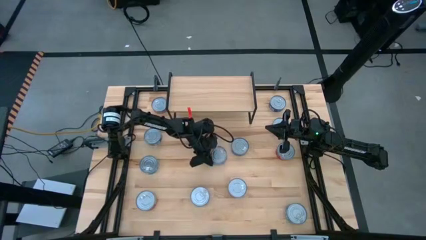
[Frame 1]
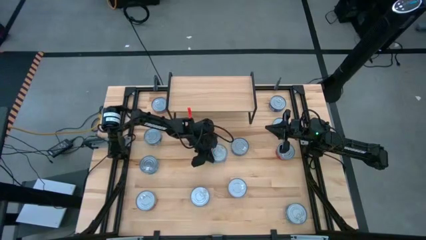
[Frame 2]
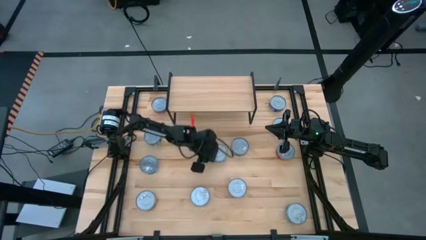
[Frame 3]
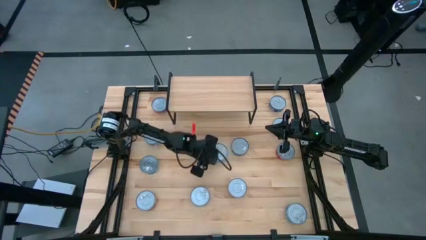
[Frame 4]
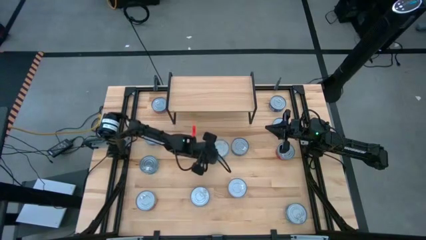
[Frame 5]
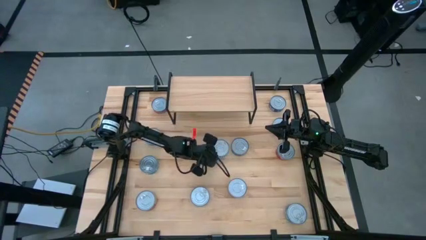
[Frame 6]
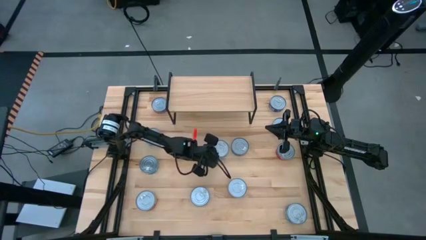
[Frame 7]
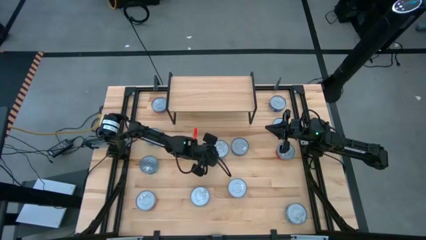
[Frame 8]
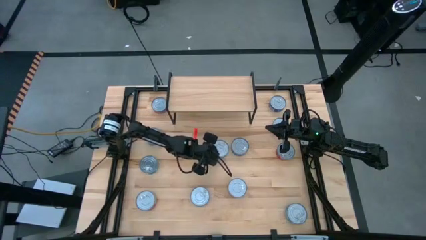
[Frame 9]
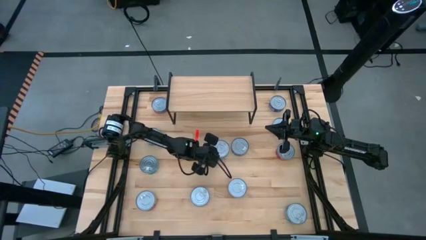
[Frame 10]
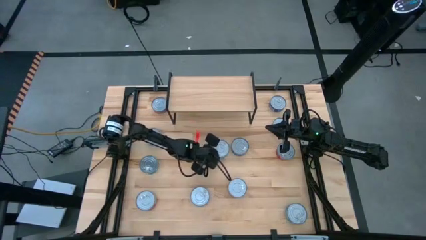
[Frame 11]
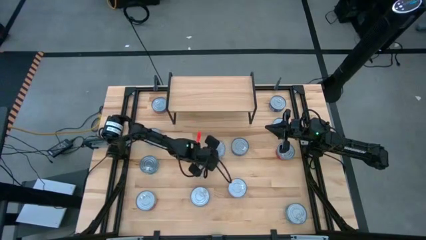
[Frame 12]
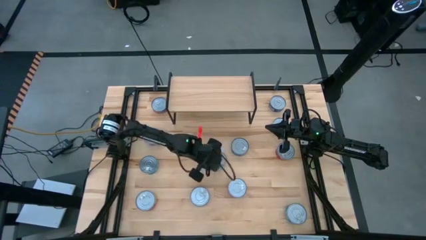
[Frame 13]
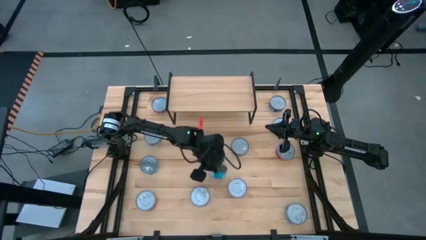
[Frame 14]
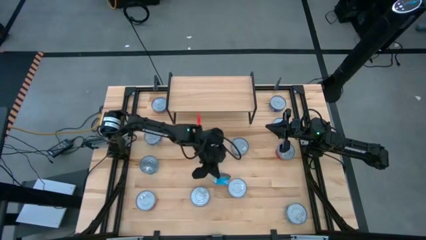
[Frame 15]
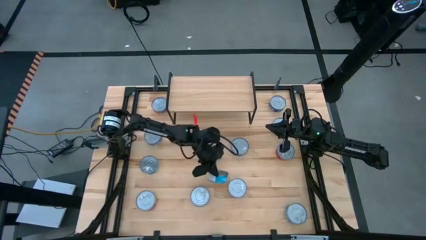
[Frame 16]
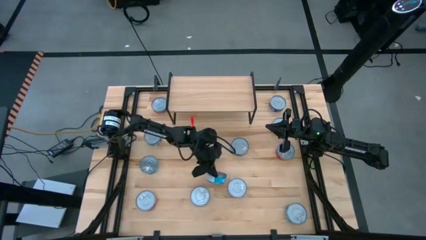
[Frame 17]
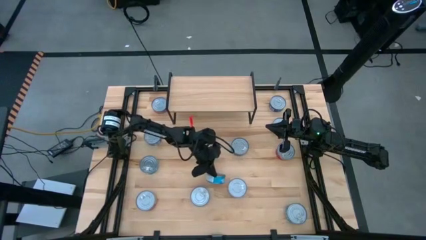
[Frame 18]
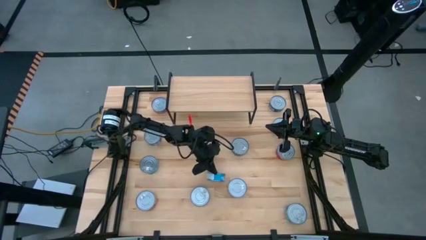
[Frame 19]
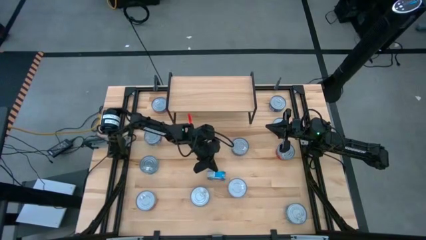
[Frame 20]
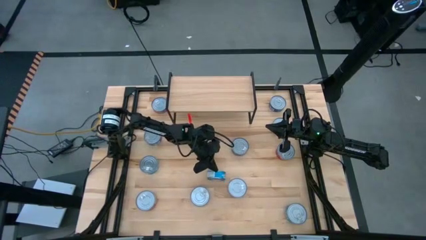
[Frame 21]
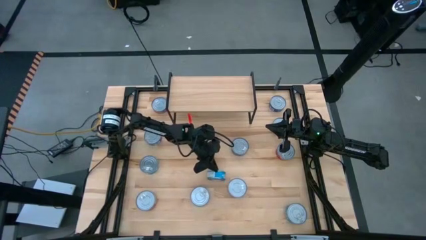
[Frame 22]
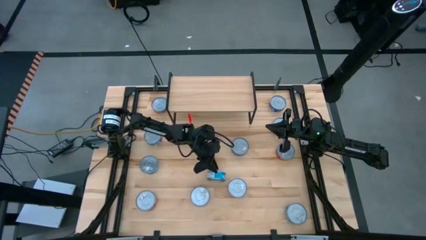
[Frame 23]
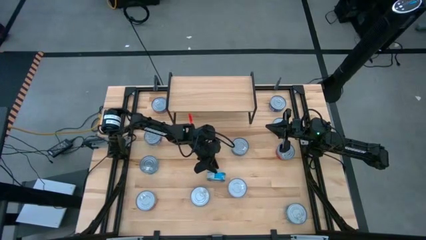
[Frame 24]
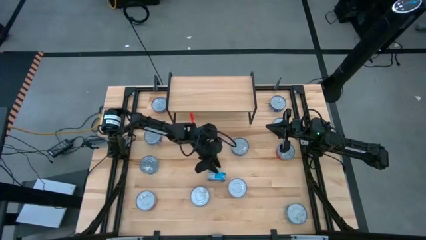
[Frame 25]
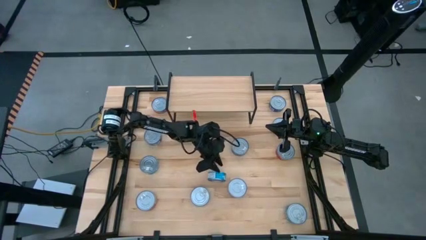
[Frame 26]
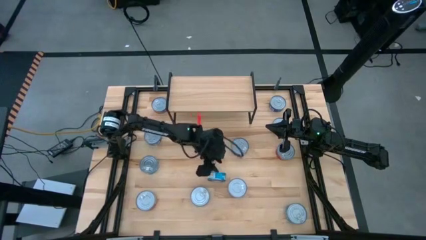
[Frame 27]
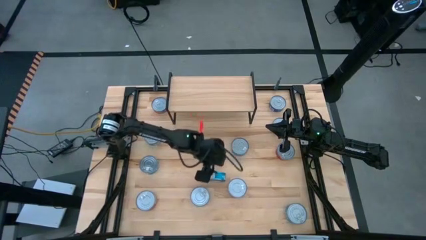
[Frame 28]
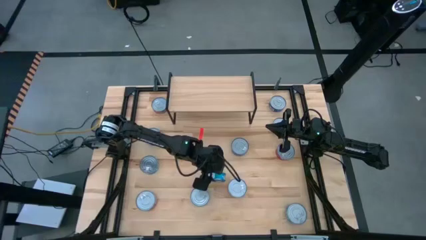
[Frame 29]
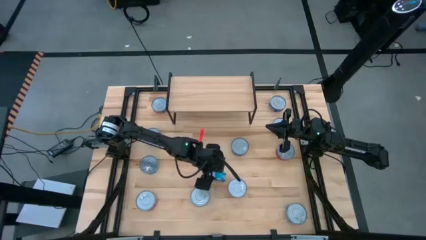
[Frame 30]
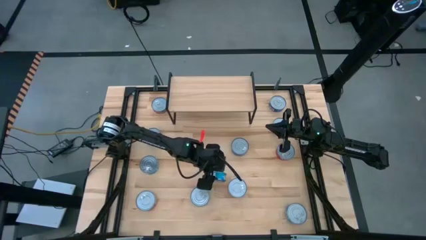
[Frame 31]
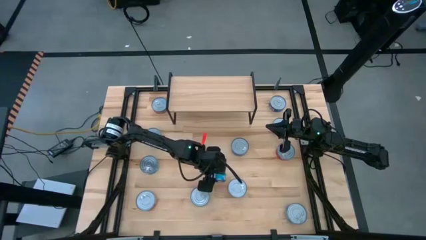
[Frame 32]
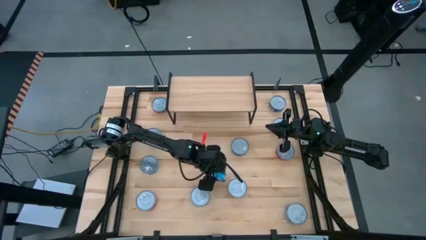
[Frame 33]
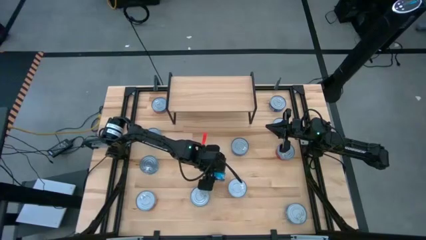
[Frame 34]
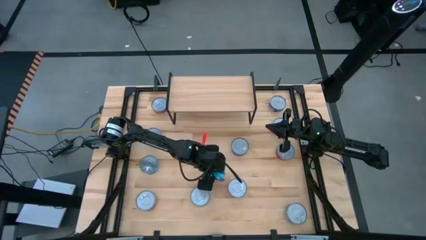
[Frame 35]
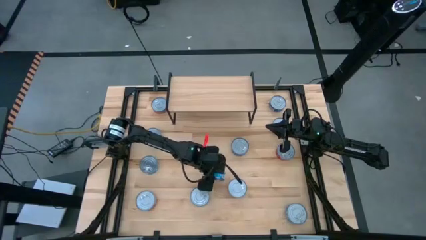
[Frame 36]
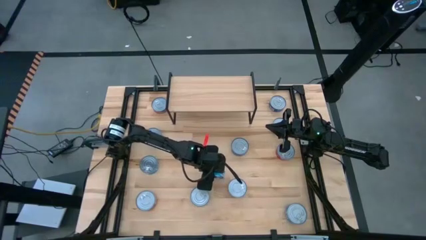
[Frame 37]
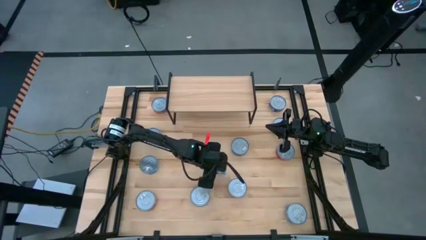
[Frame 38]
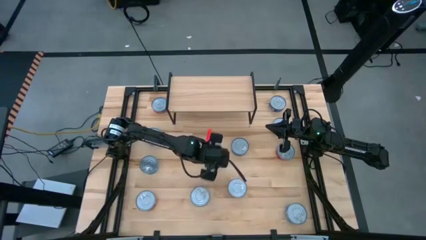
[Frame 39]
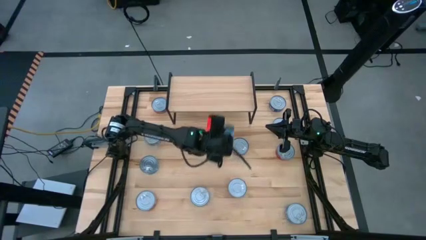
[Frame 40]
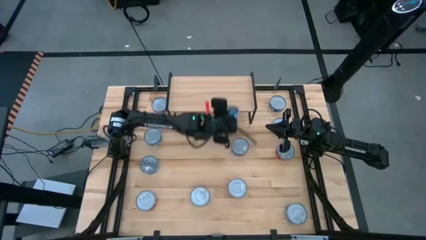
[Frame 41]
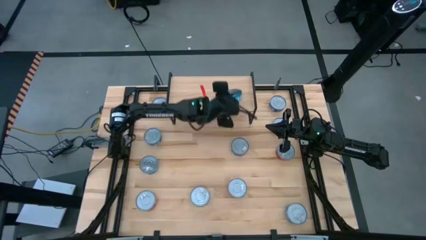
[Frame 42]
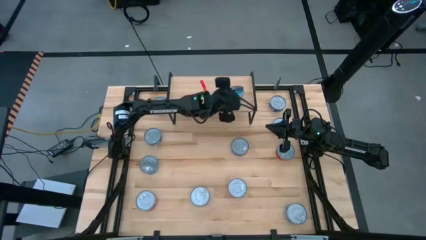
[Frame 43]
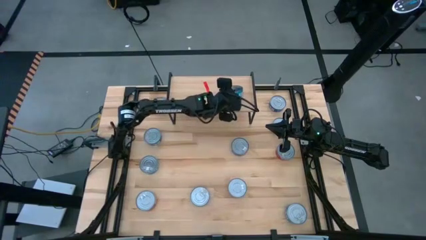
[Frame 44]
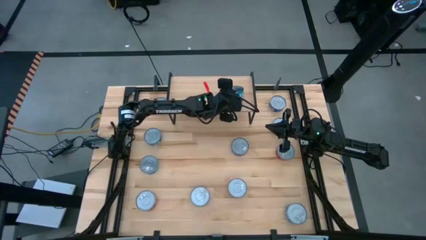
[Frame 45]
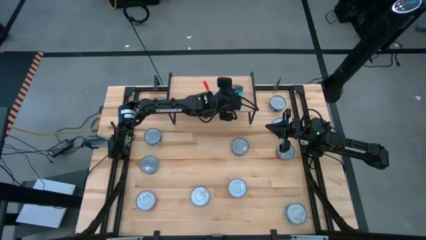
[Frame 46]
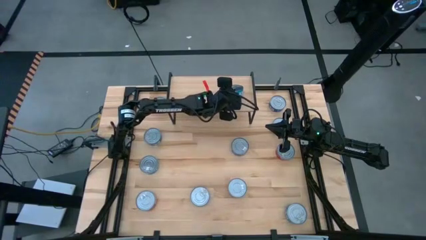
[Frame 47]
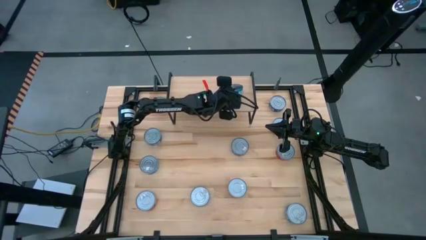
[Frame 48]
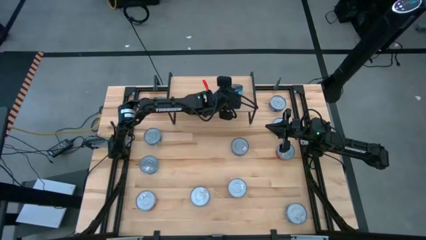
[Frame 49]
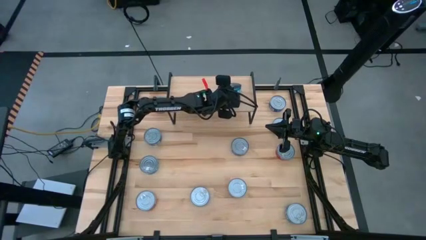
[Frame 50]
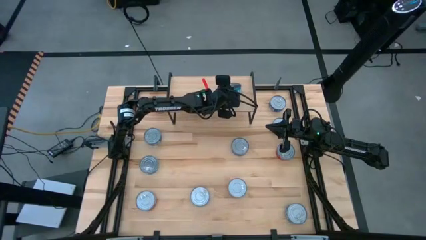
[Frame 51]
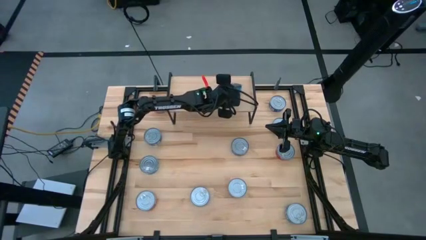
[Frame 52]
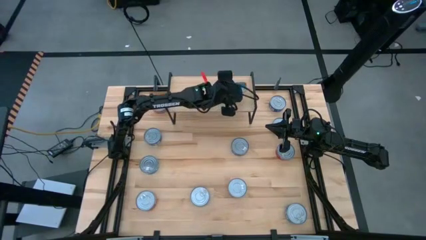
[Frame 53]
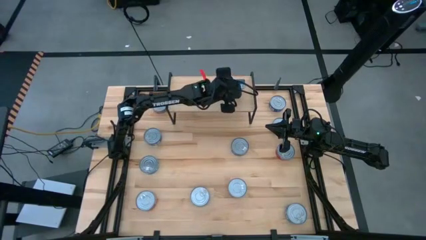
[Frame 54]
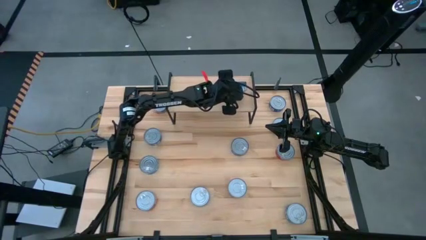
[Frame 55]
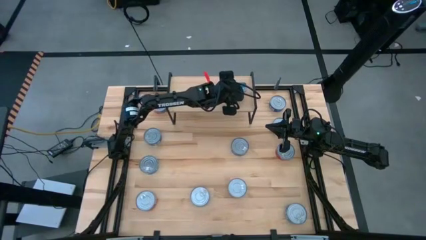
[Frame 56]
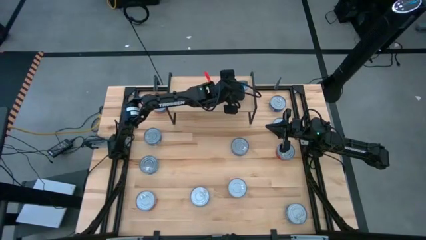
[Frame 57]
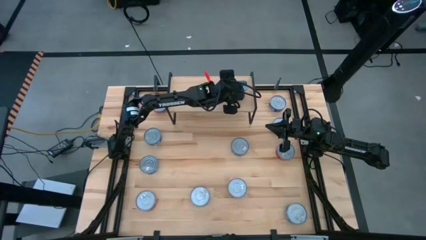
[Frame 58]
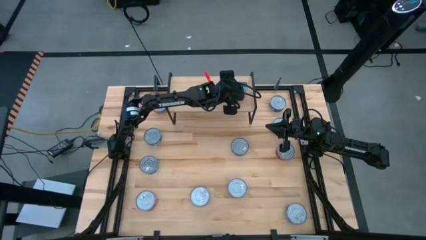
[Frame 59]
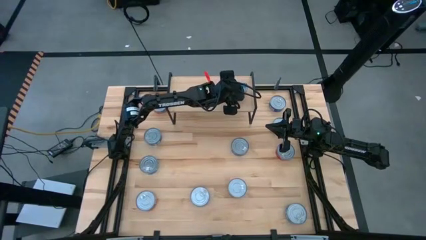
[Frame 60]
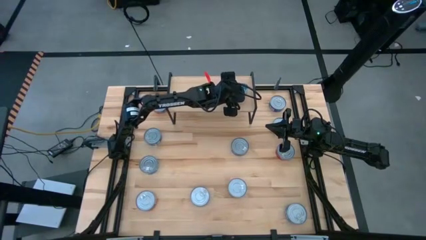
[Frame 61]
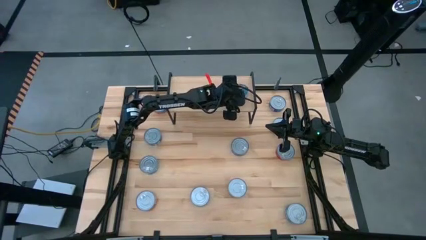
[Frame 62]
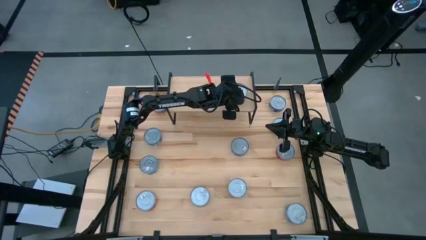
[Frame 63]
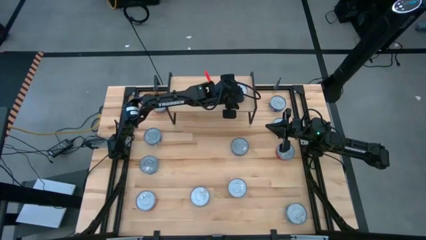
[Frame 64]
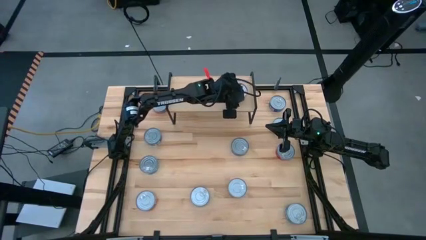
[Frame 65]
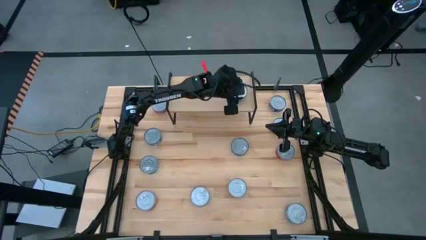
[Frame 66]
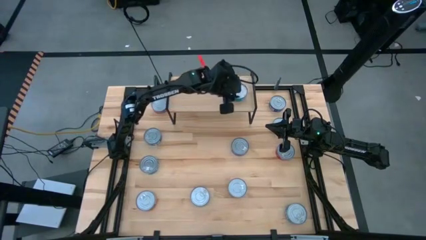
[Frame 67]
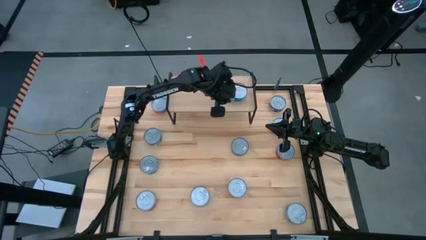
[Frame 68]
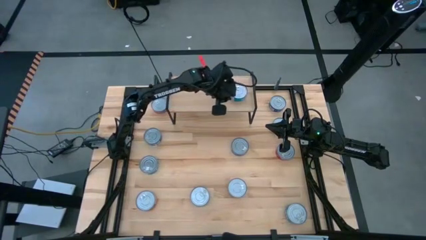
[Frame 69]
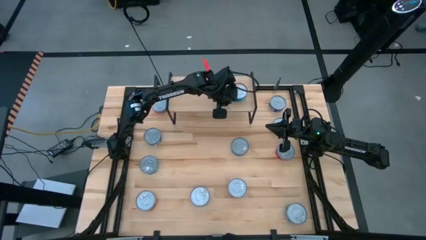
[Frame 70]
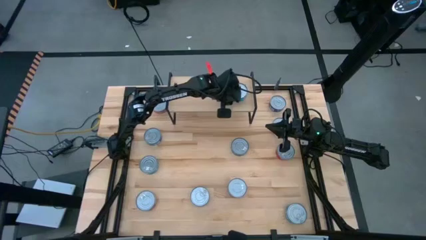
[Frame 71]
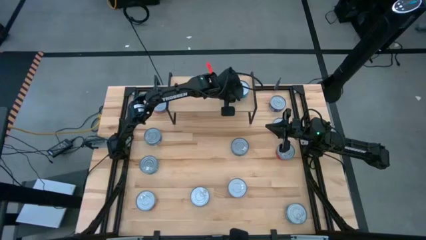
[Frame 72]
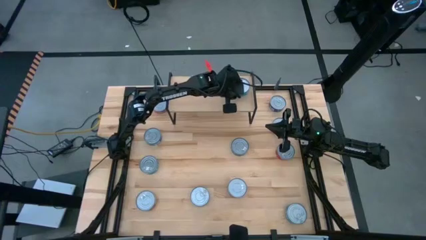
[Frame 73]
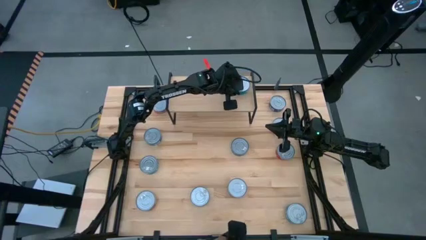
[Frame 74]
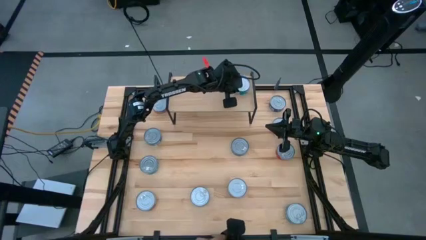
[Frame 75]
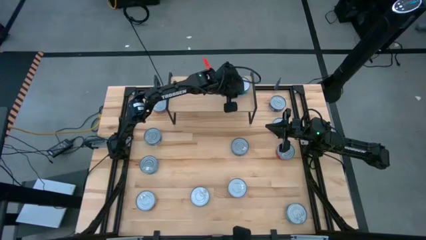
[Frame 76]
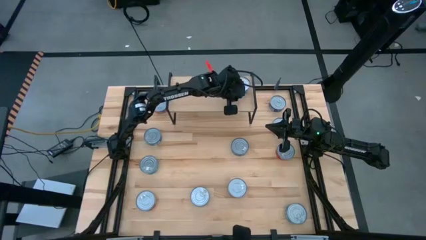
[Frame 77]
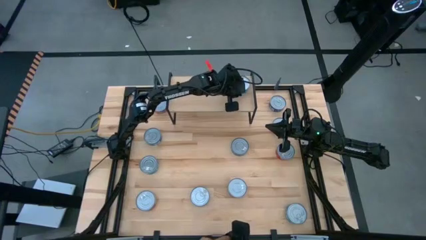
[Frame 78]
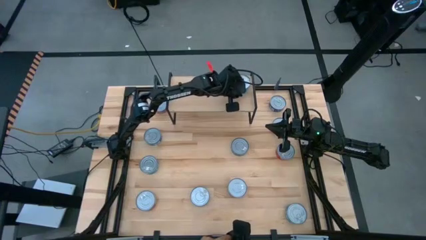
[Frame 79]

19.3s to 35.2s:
Task: Stack canned seafood by type on shelf
Put the yellow blue tuna can on the shelf
